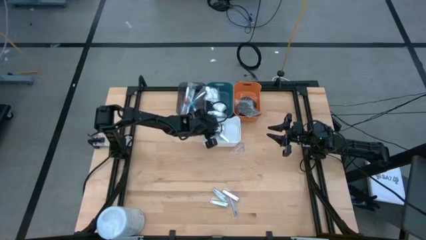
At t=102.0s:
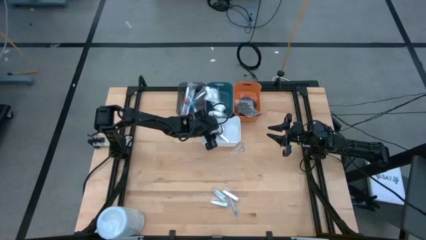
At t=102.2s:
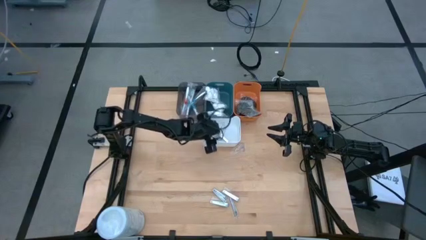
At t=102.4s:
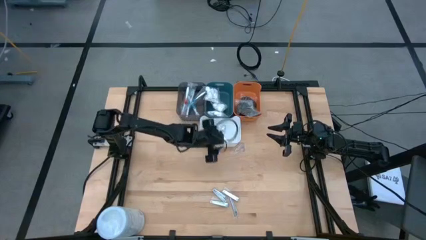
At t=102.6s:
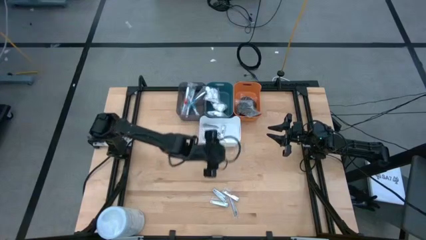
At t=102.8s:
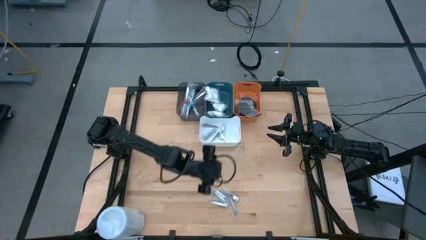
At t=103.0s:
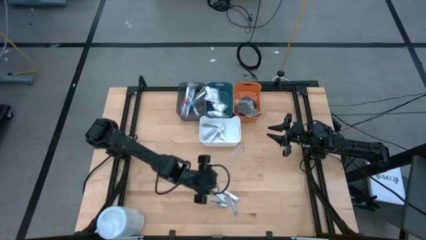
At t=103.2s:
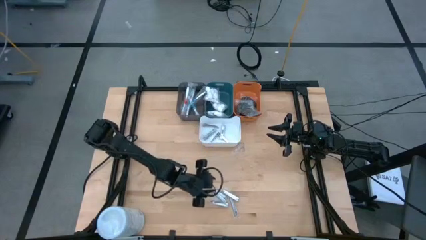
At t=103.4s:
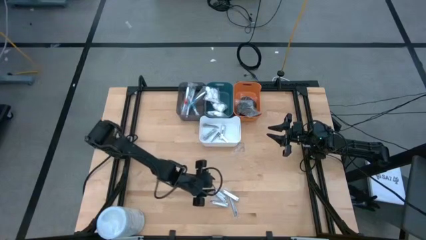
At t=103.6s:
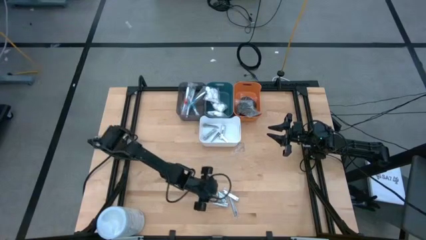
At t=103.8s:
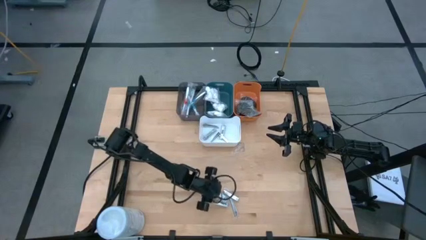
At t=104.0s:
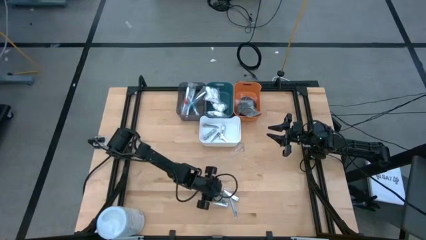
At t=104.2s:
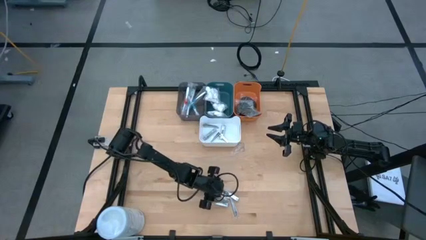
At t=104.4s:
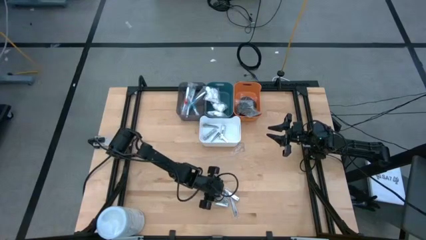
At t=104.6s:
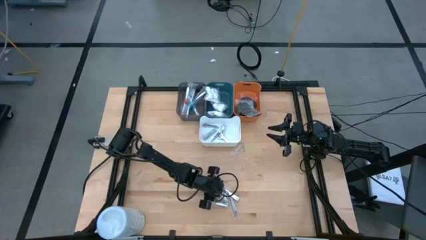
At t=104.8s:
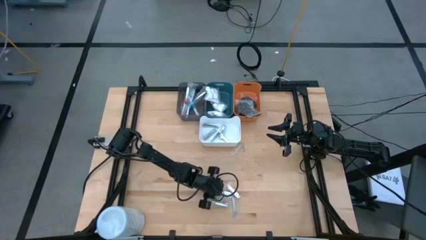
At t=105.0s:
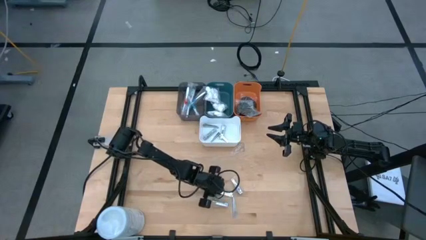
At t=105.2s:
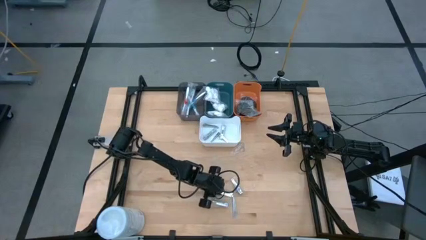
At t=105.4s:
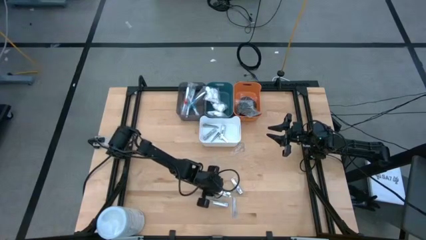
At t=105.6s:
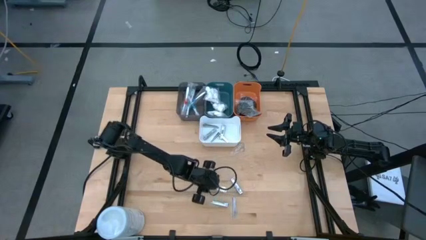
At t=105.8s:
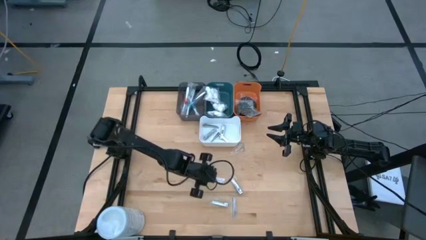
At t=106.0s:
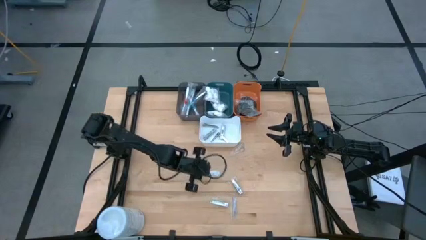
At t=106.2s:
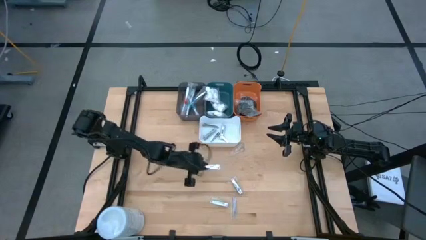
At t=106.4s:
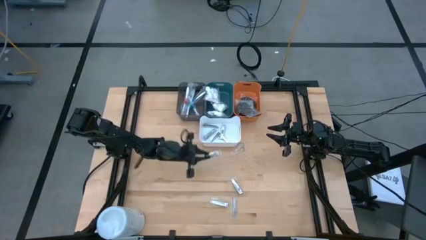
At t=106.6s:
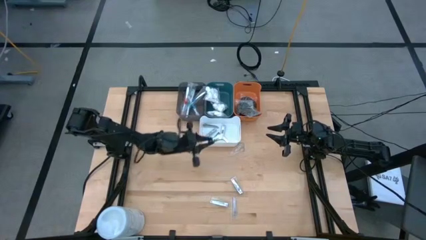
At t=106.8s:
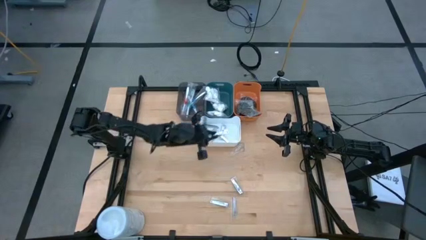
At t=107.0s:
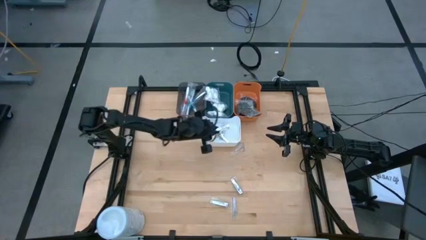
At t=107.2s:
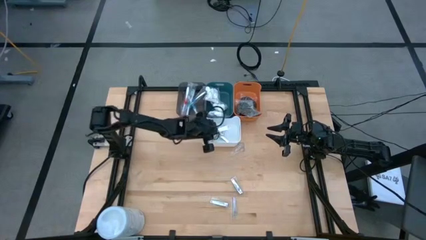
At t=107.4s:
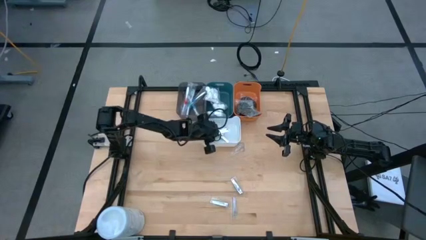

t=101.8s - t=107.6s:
Task: Pick & Place Travel size toiletries
Put the silver nail cutter into the white bin

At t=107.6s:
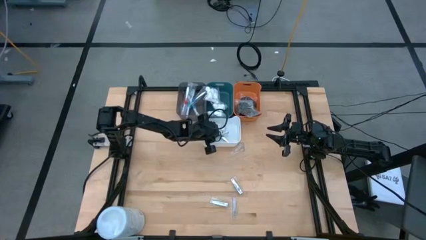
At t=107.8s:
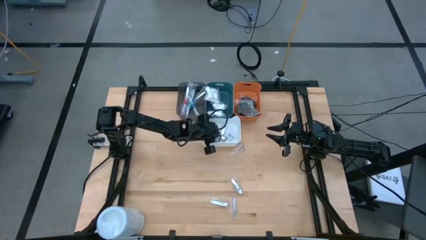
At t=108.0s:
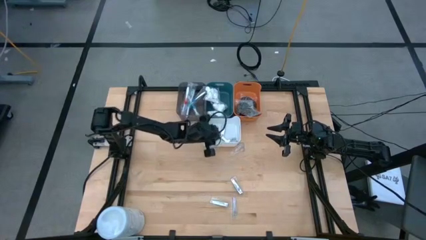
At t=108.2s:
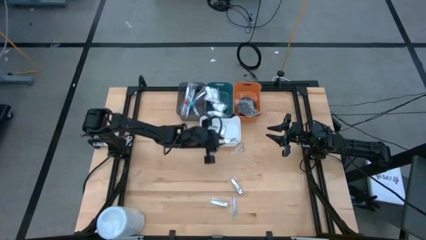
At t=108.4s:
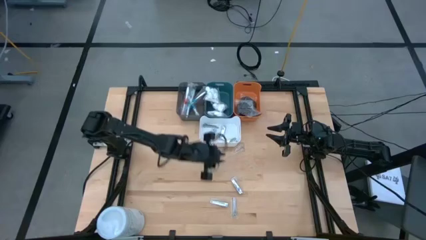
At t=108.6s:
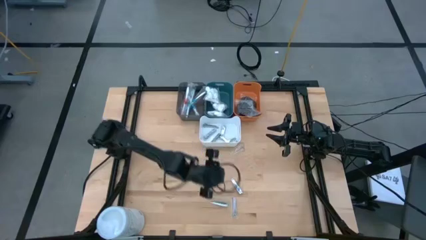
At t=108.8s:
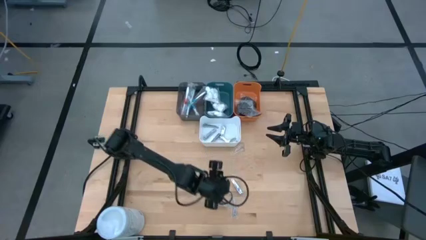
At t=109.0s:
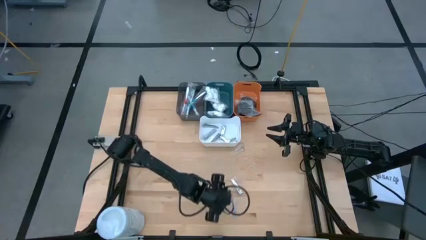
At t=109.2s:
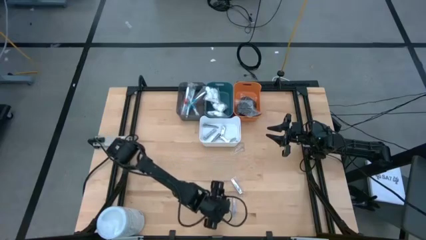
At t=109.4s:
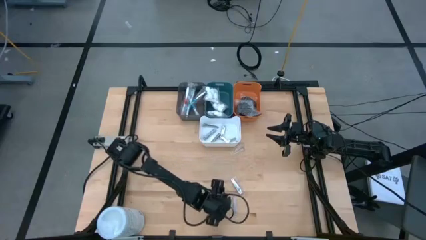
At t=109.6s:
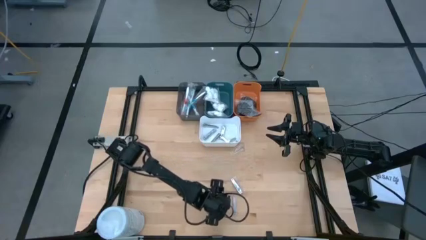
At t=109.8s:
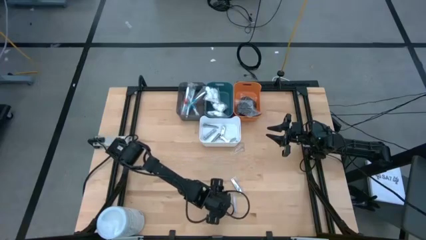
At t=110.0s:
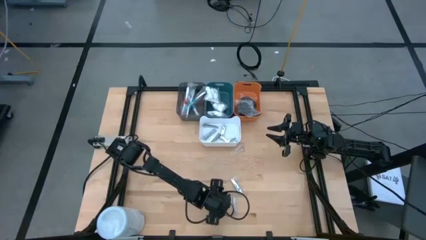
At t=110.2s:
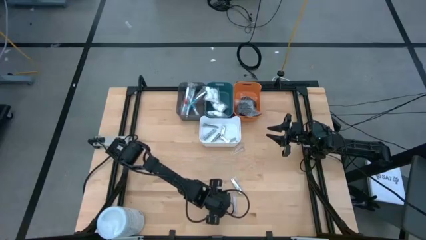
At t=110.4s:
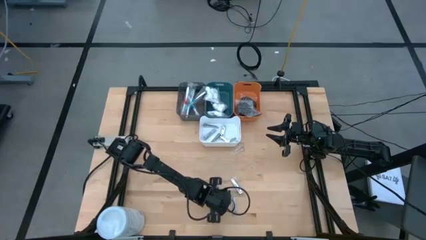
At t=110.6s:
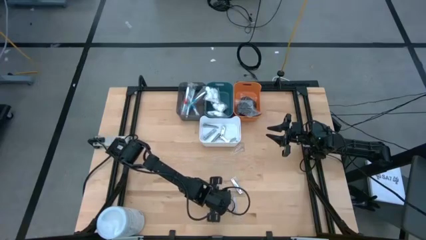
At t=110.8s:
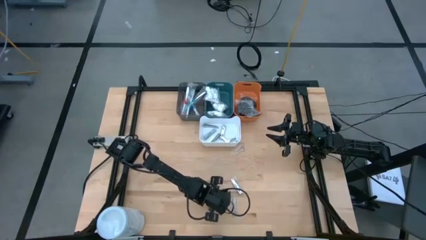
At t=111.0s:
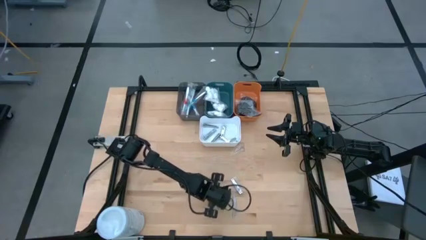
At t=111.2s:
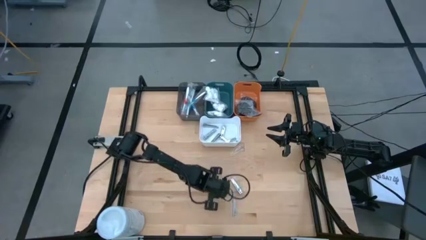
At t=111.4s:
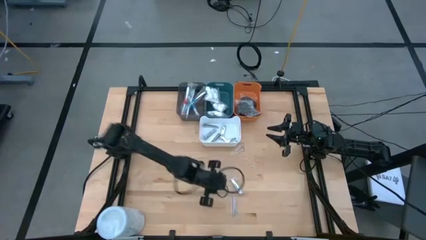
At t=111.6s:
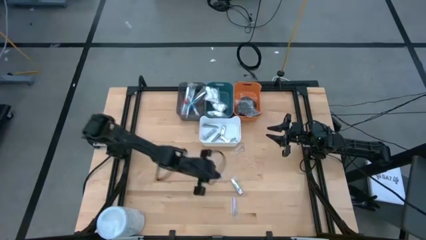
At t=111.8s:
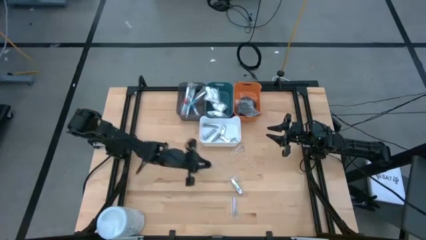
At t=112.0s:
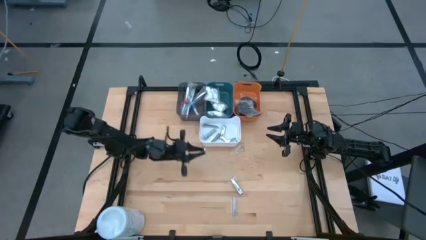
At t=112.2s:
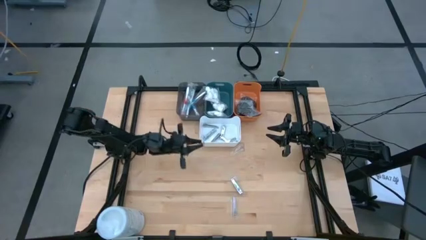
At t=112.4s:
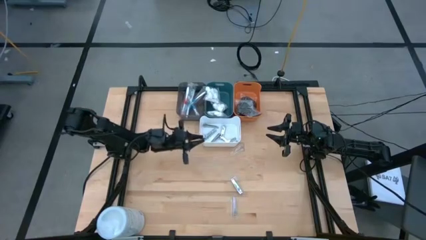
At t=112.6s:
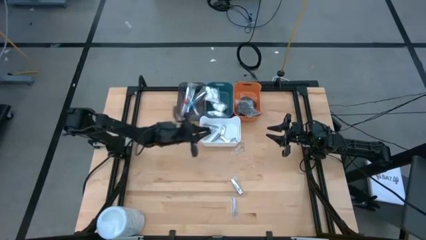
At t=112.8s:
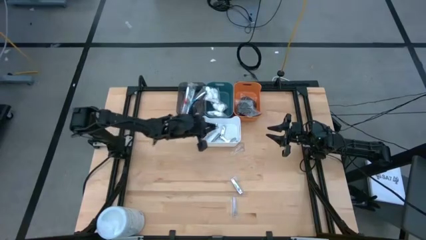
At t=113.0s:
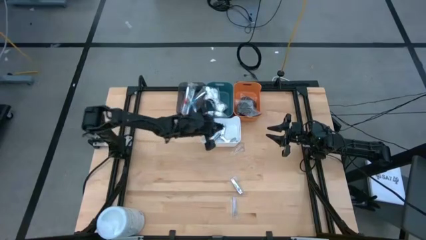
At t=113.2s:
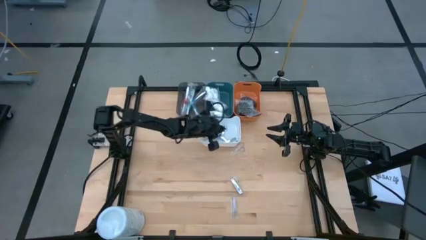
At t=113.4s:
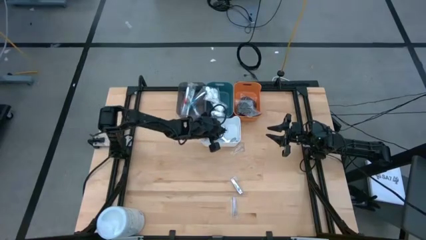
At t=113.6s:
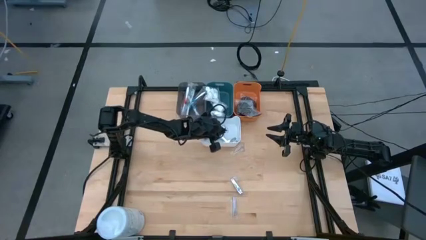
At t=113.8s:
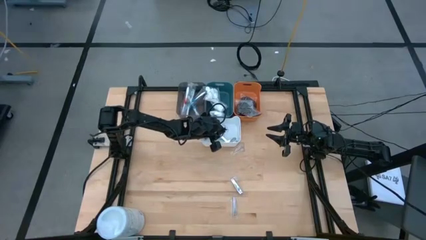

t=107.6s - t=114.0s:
Put the silver nail cutter into the white bin

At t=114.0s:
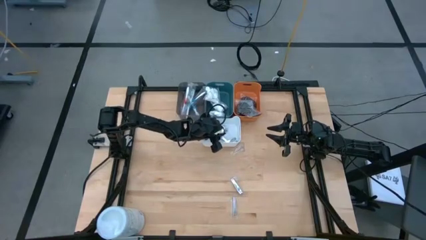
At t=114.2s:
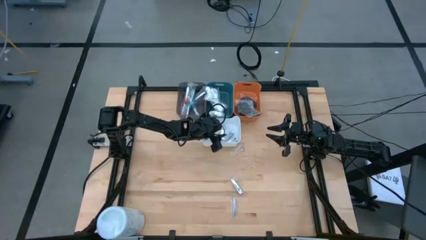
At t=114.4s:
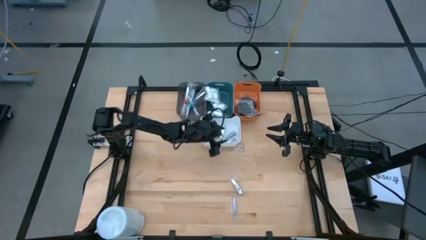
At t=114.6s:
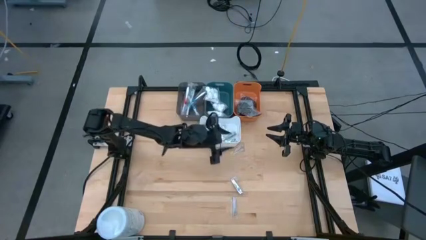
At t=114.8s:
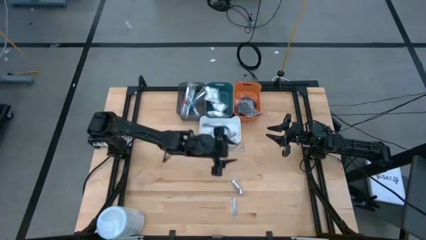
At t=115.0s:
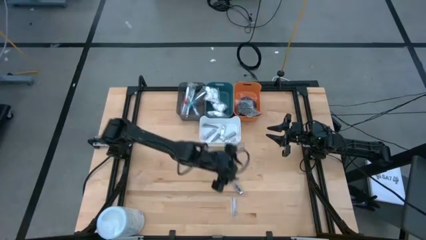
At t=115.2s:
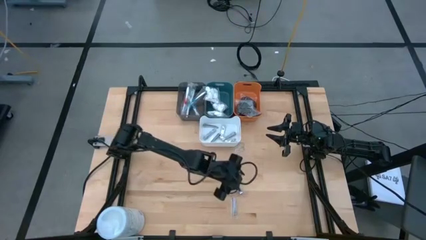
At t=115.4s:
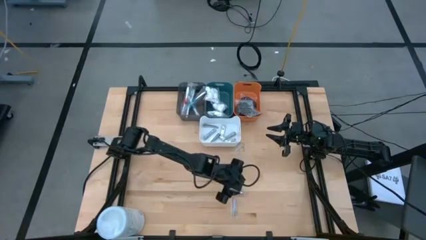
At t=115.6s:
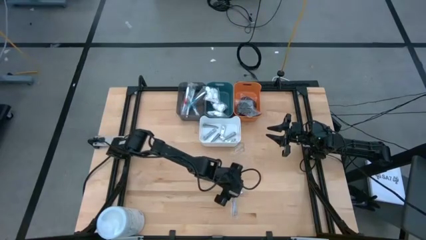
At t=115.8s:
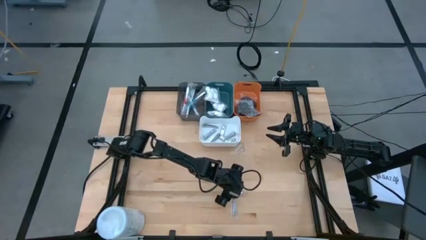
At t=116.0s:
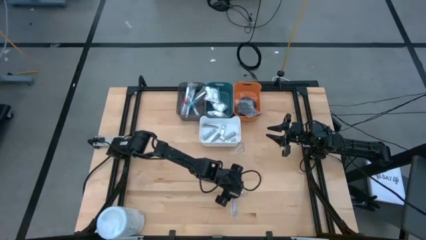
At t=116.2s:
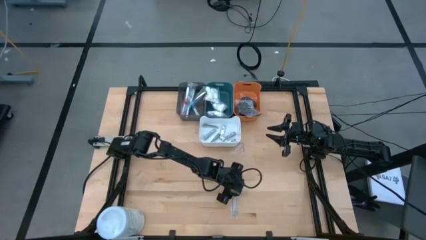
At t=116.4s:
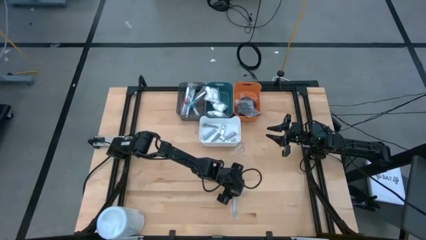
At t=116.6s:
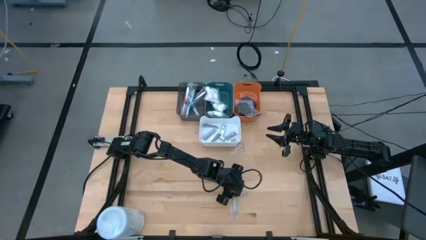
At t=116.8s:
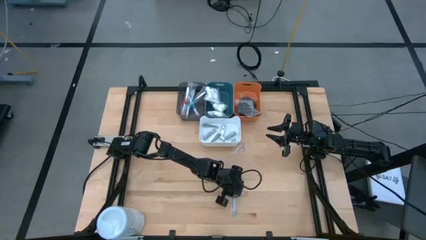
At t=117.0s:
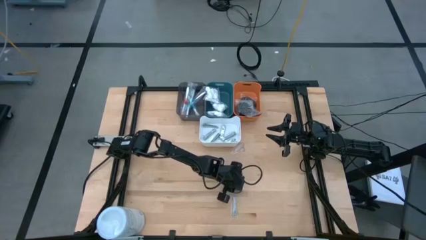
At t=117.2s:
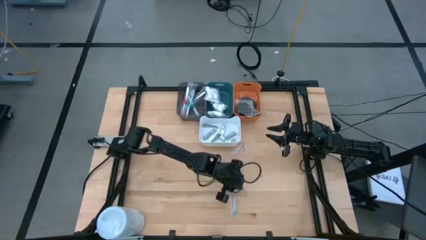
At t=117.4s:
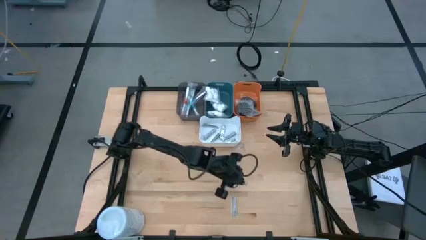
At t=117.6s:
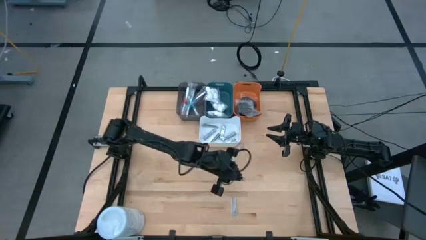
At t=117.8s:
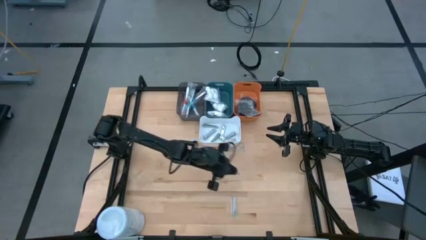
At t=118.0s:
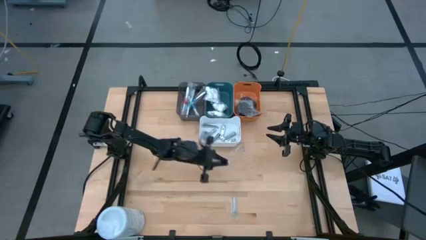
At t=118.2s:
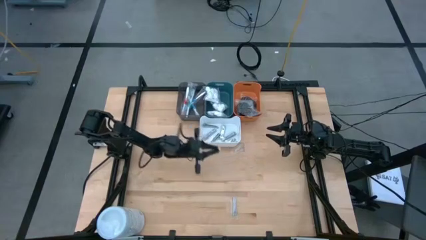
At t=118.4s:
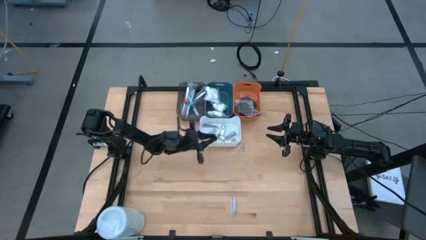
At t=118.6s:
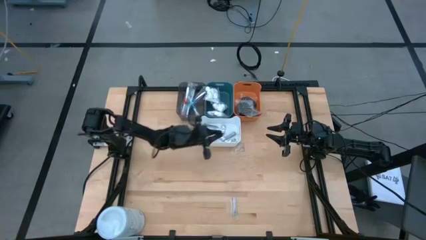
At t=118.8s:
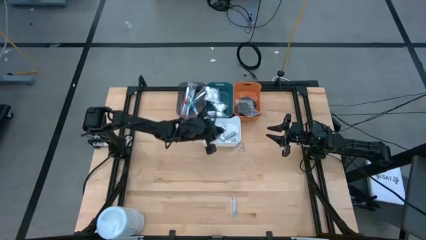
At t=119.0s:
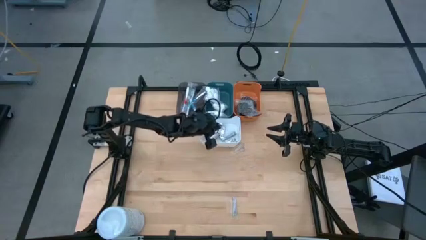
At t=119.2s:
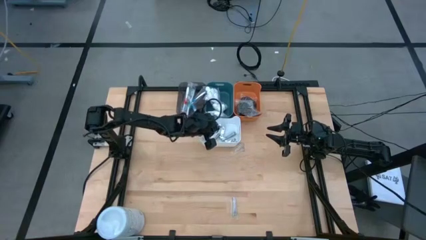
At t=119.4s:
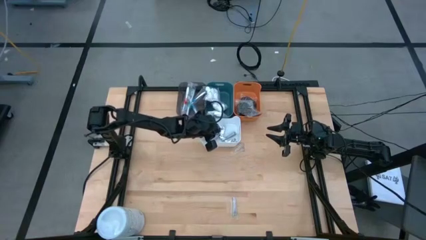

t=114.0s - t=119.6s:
Put the silver nail cutter into the white bin
